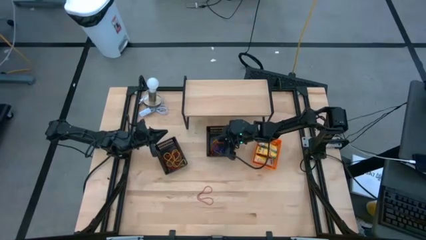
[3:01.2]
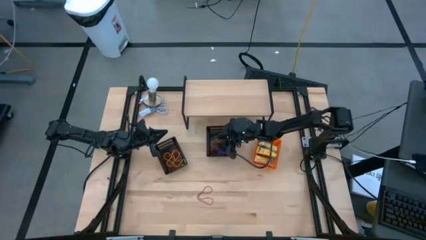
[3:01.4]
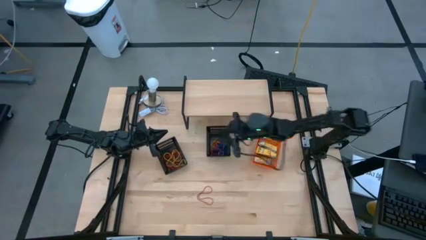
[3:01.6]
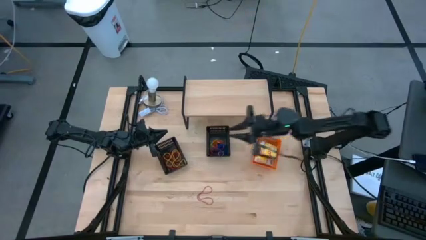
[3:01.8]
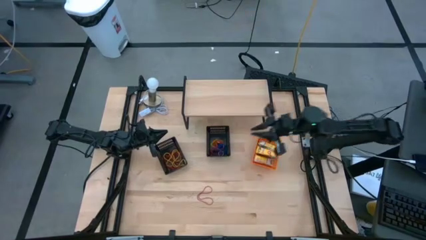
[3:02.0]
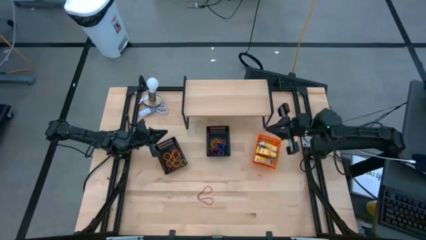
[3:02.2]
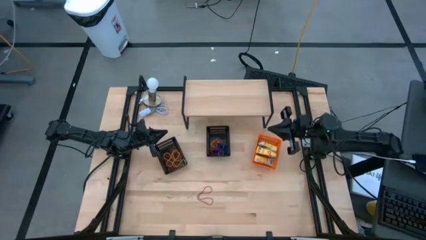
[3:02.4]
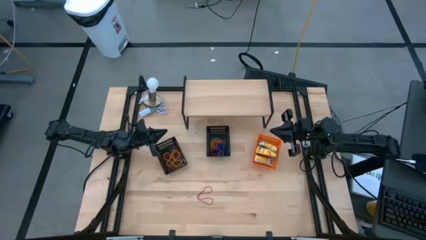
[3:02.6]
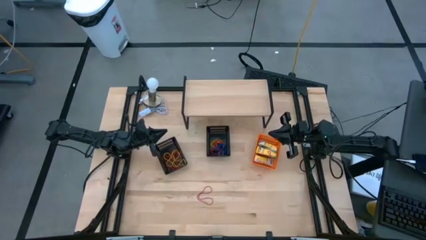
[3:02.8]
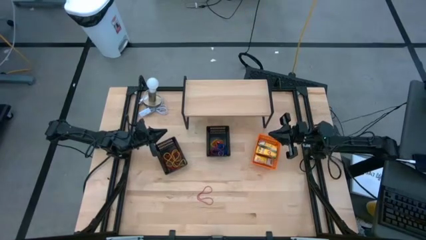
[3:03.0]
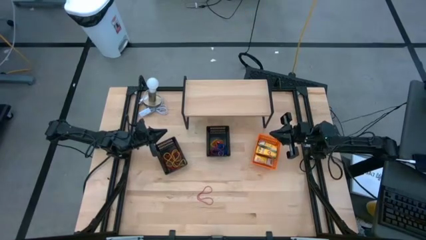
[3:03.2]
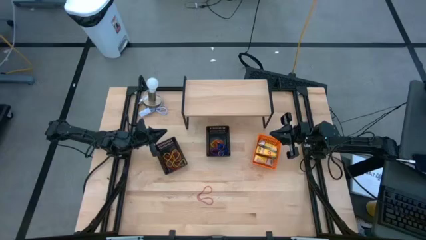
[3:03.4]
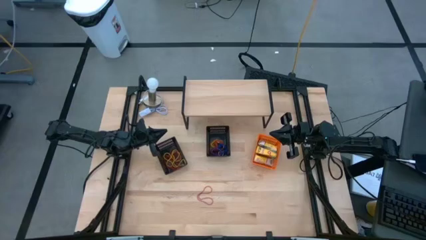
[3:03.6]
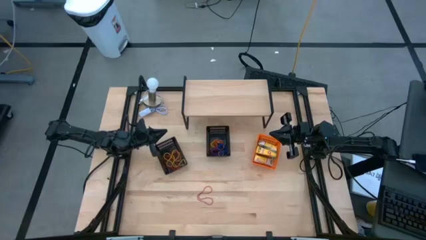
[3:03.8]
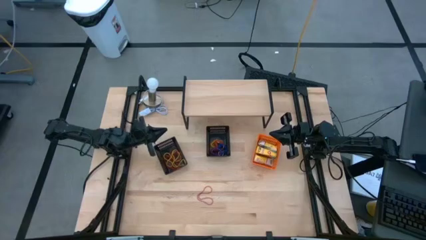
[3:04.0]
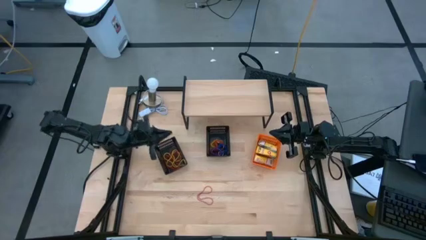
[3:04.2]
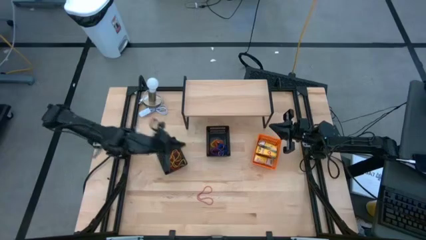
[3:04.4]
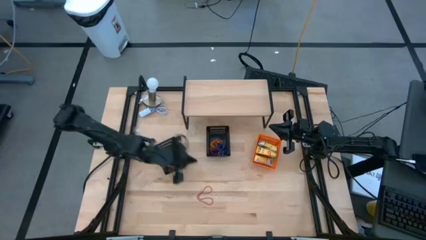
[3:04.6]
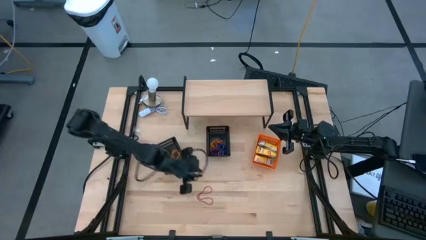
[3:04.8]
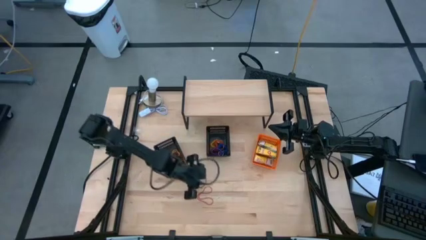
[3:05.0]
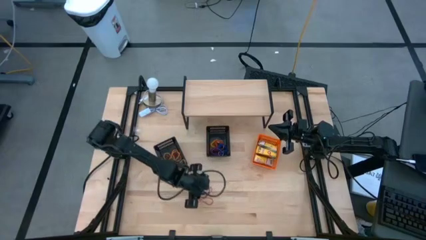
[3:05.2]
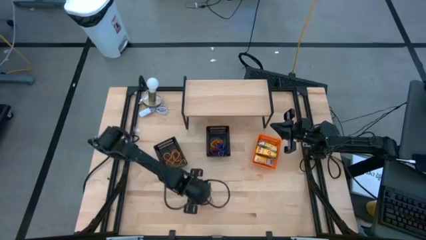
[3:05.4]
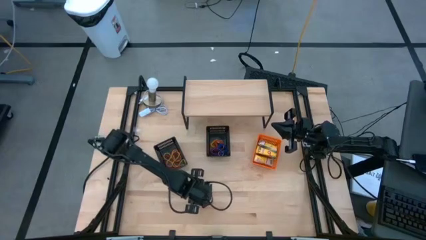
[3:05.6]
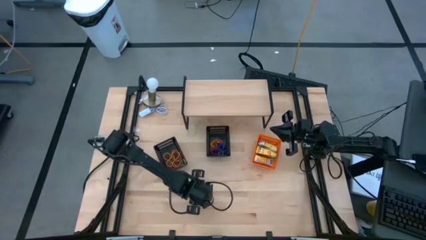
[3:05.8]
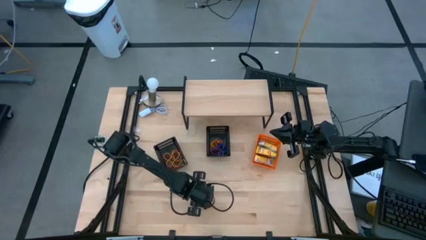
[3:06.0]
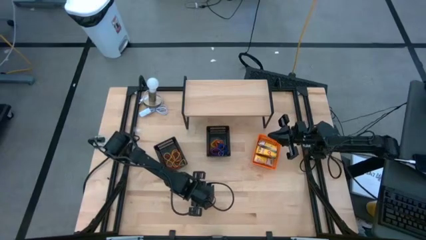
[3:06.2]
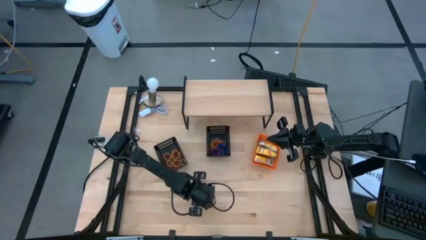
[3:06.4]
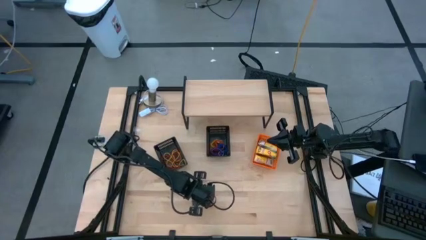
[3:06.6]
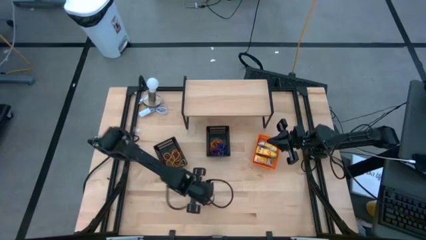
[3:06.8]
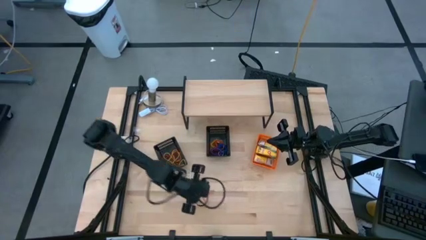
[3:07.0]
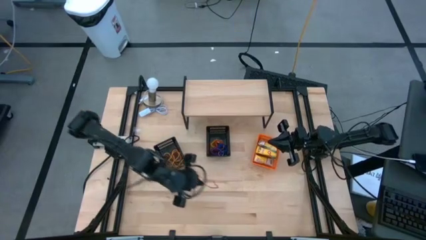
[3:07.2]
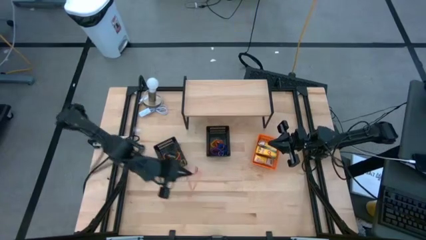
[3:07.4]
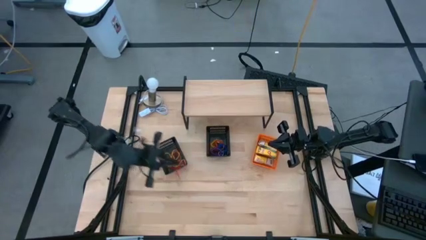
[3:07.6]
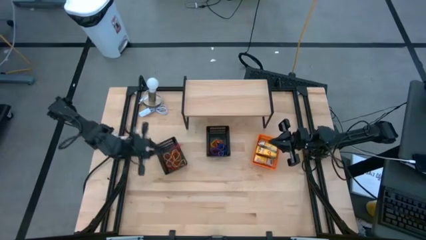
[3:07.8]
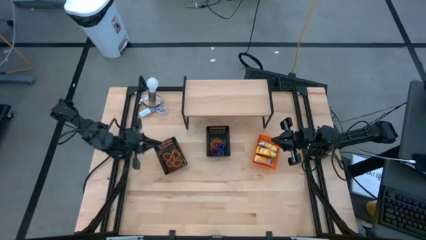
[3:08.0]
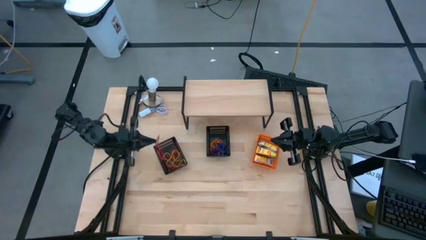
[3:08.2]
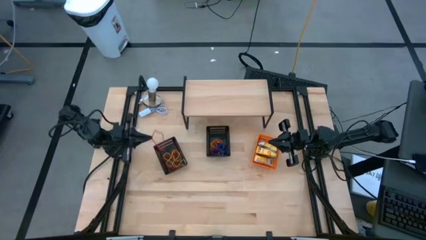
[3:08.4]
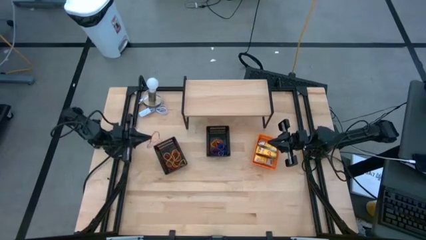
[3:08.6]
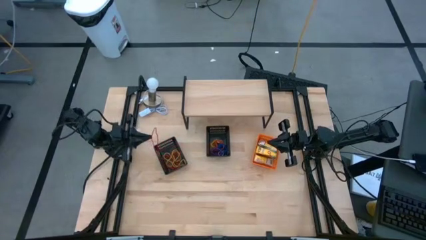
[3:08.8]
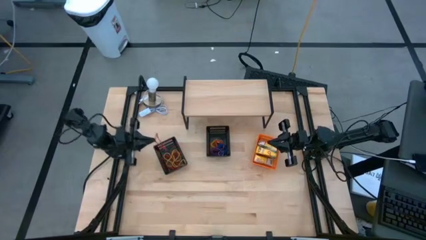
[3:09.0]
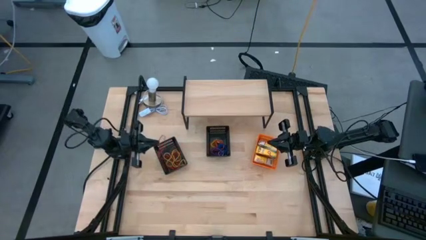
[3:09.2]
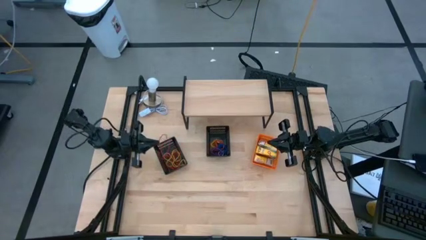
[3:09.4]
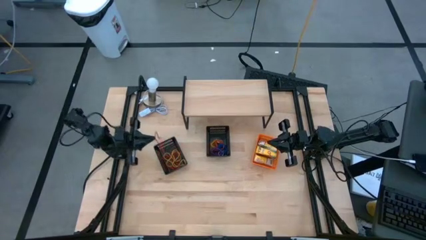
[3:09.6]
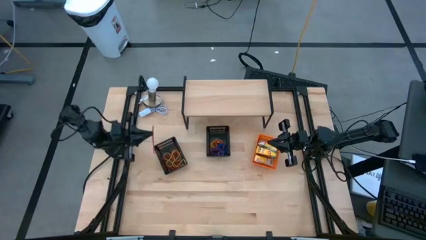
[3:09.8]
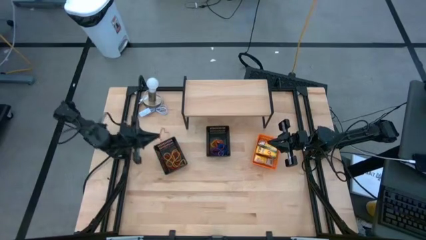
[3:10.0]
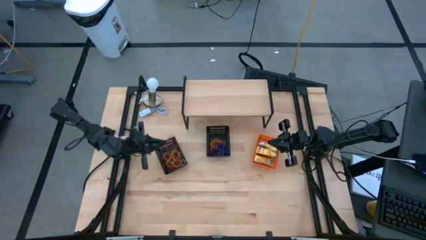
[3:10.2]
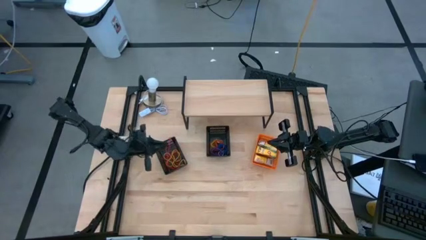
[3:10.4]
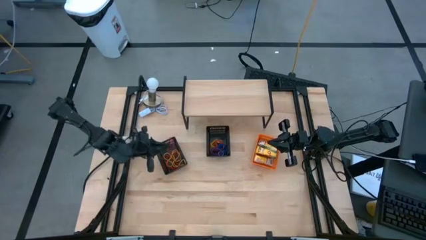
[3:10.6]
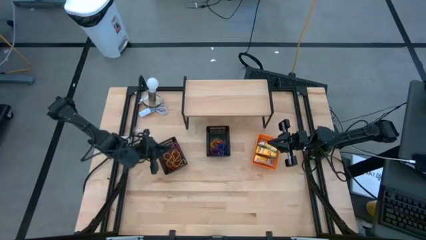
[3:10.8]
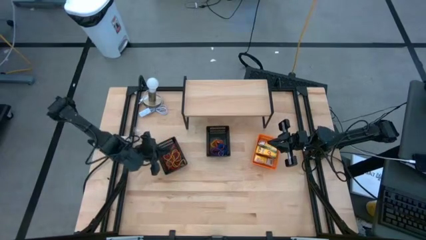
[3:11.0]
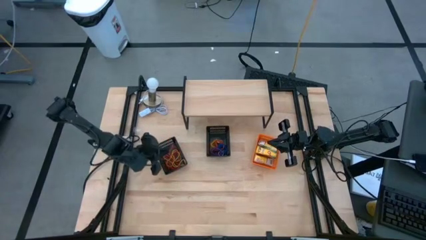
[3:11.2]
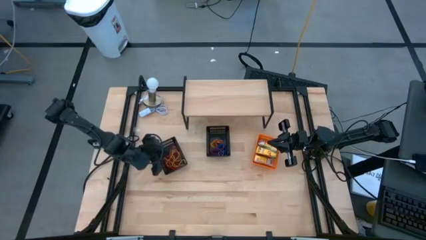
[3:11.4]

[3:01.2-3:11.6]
Task: Pick & Place Office Desk Supplies
Put the red rubber band into the left black basket

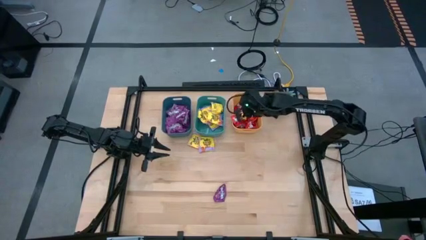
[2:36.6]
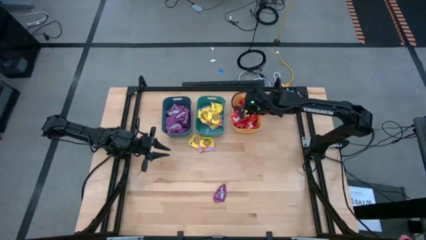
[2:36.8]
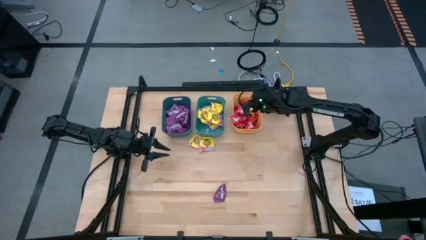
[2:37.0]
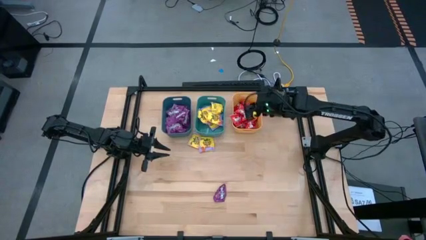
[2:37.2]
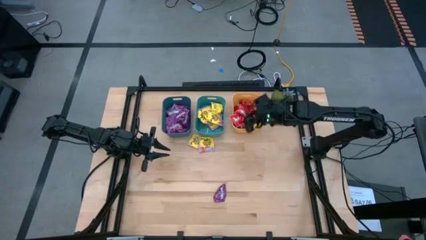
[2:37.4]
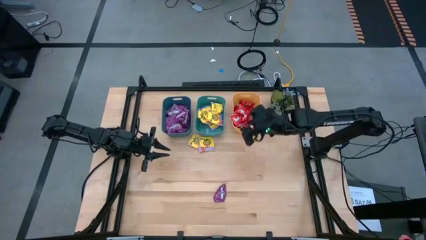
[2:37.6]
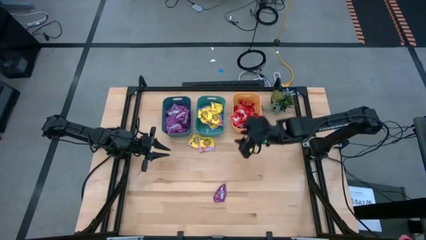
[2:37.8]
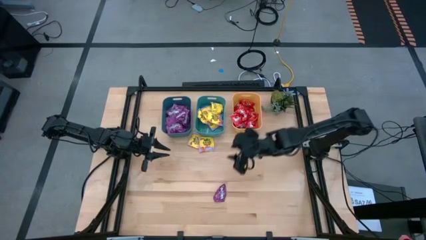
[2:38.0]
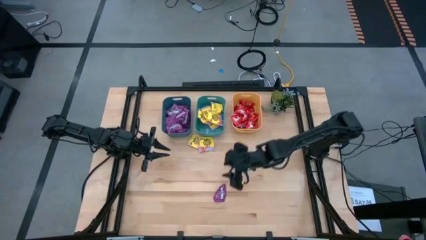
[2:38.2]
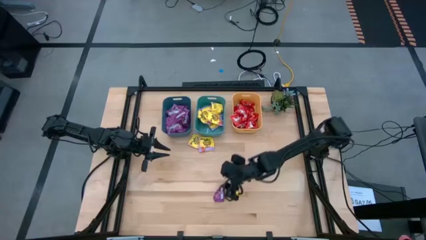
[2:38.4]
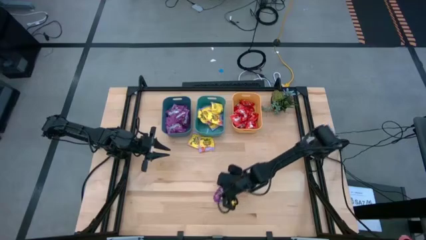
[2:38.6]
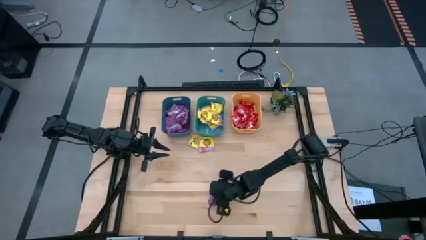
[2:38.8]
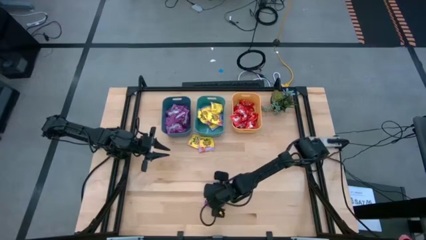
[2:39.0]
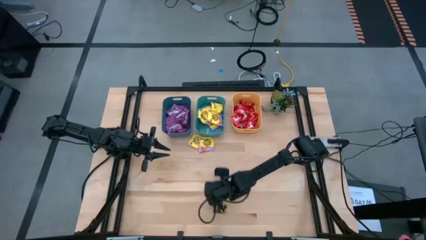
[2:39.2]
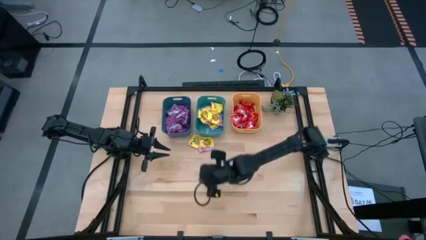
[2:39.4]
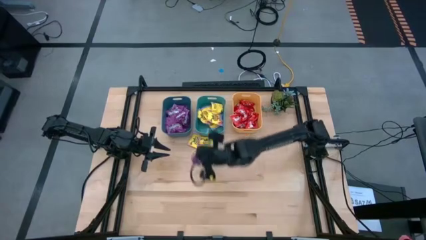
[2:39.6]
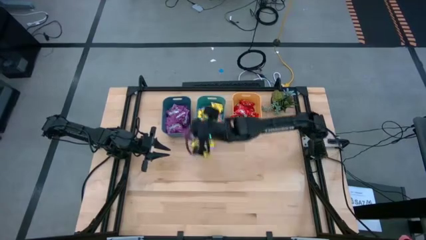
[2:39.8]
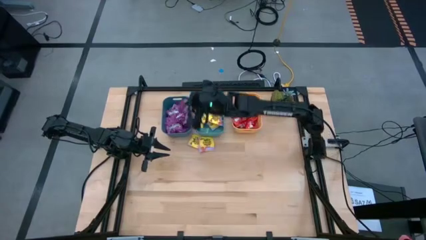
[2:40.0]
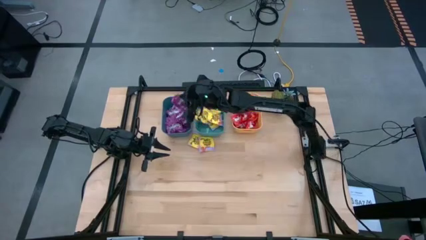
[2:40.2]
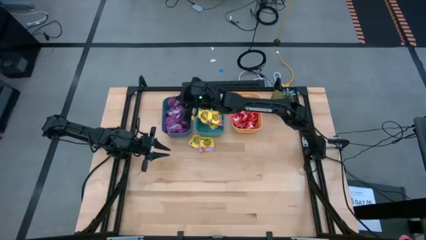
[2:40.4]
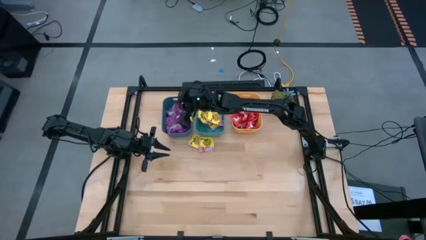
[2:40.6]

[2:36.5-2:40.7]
Task: Sort candy
Put the violet candy into the blue bin

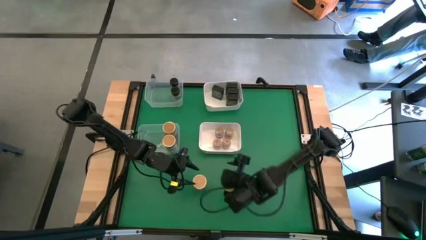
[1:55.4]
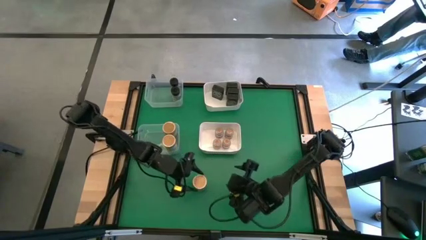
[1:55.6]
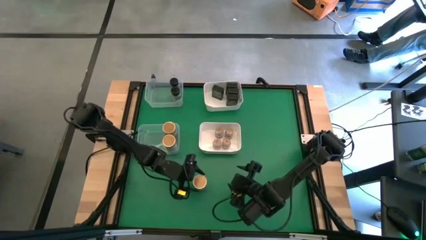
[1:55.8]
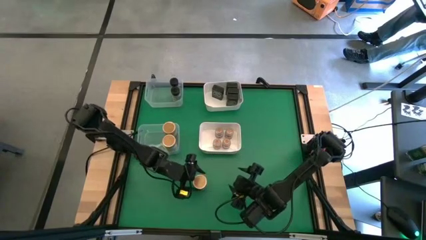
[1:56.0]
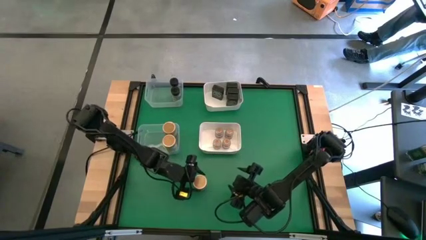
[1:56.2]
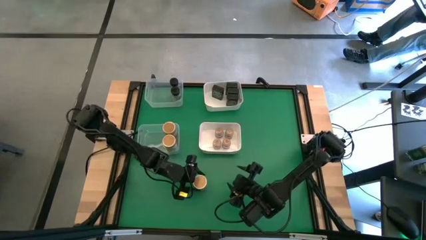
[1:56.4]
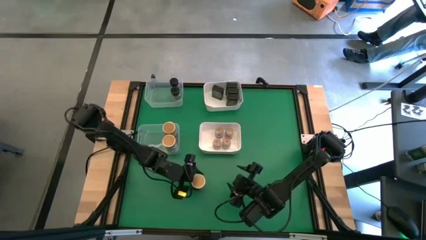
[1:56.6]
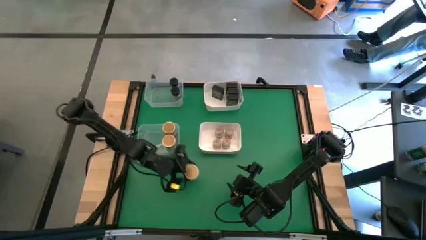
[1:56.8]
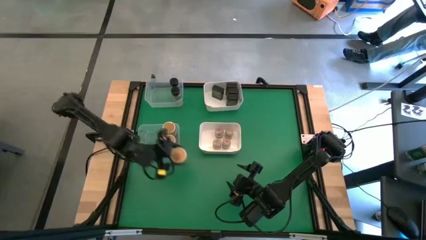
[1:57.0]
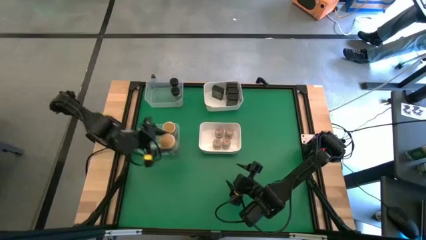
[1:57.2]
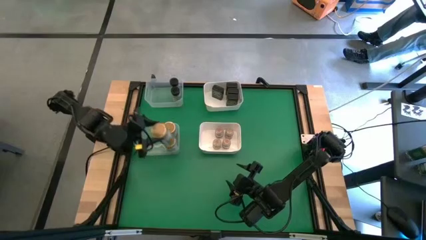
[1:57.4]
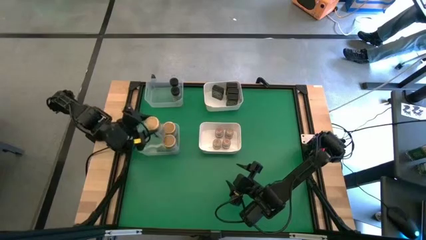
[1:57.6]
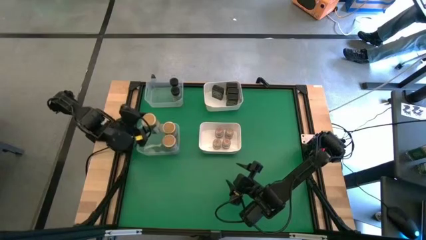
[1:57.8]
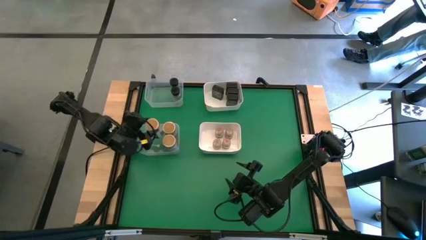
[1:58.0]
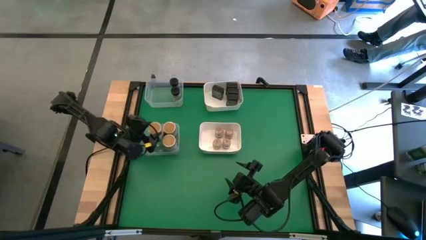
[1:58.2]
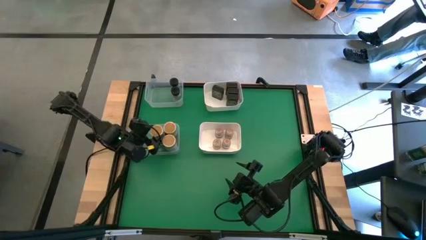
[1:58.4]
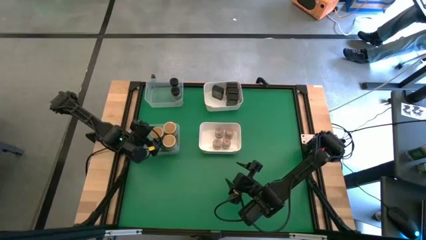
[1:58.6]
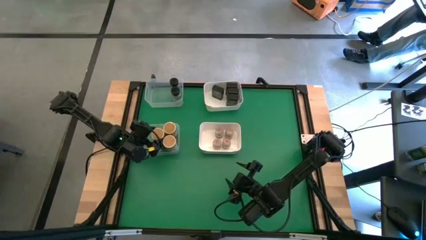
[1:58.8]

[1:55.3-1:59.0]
Task: Sort spices by type
Put the light brown seasoning bottle into the bottom transparent bin
